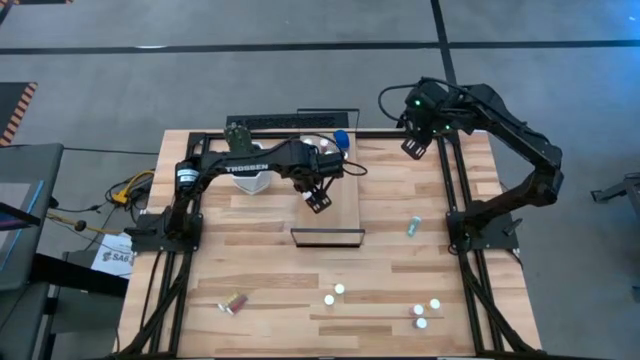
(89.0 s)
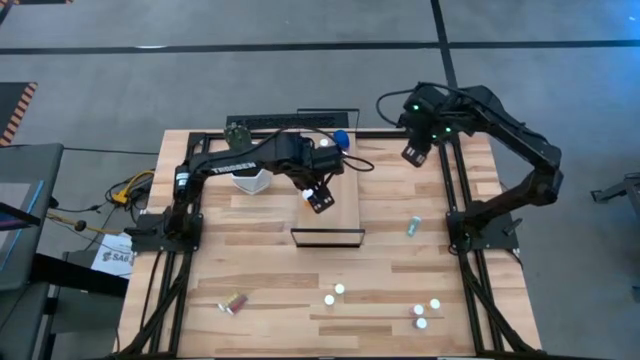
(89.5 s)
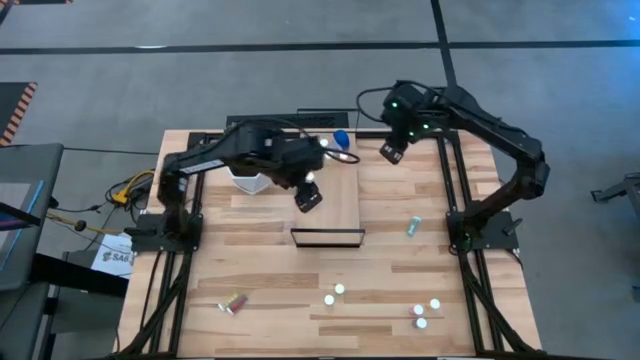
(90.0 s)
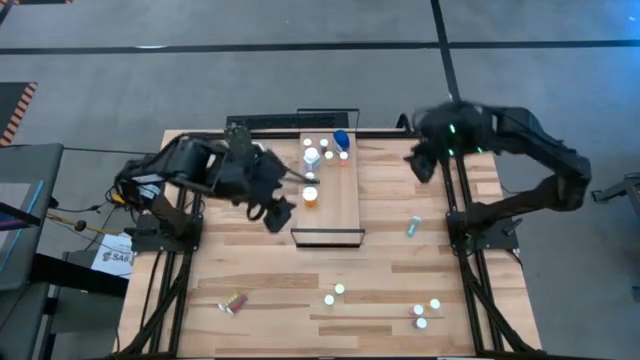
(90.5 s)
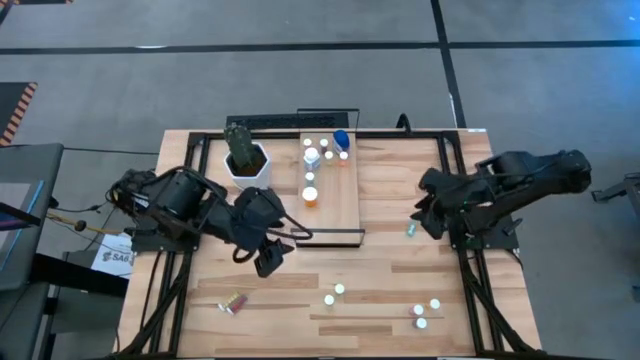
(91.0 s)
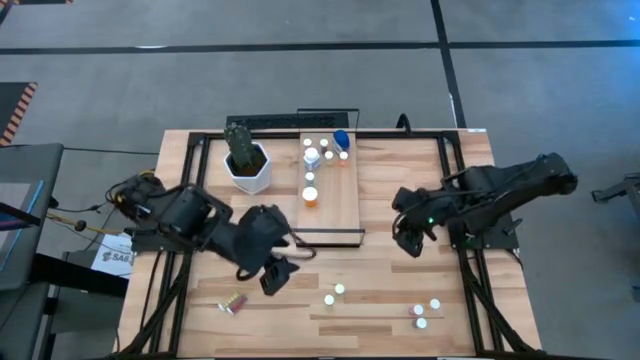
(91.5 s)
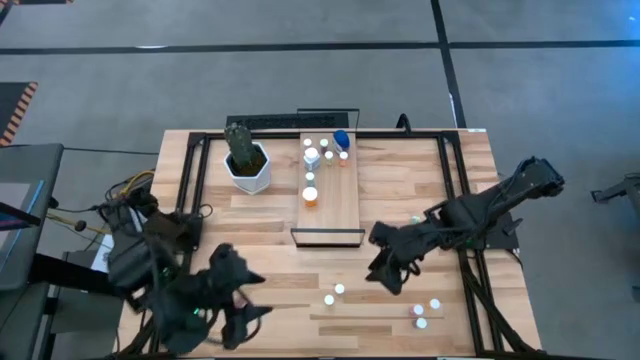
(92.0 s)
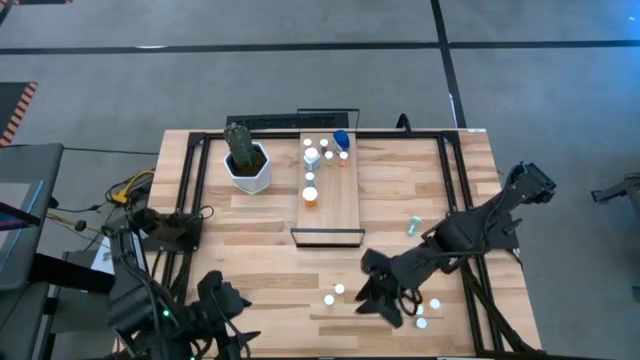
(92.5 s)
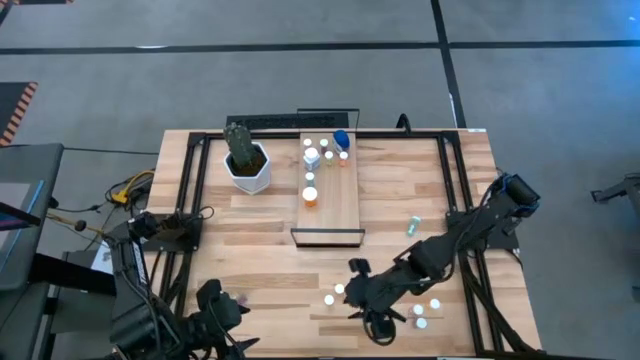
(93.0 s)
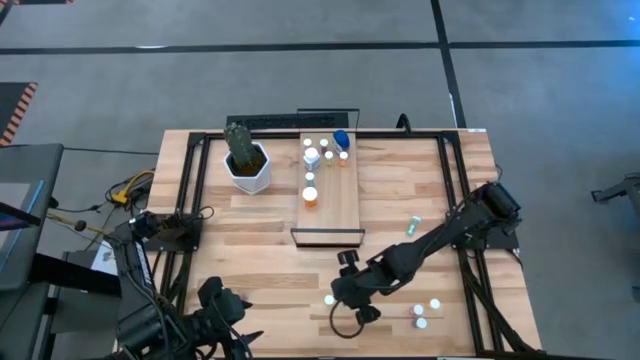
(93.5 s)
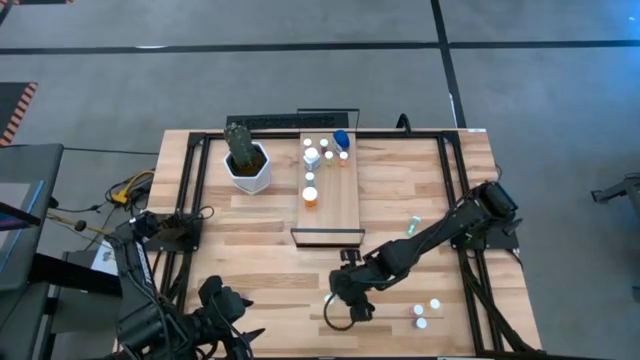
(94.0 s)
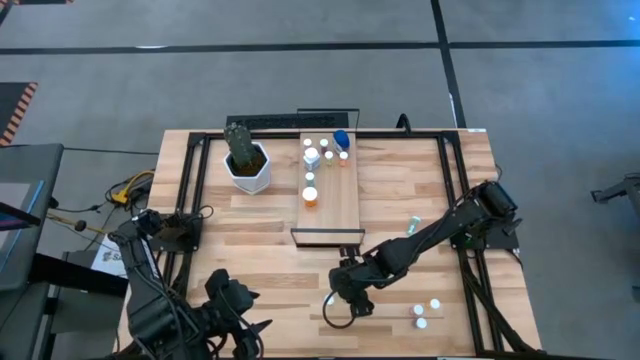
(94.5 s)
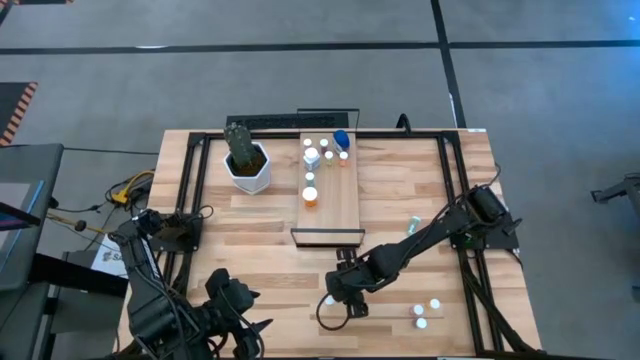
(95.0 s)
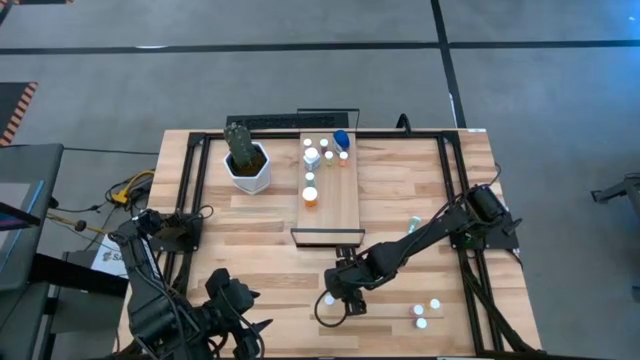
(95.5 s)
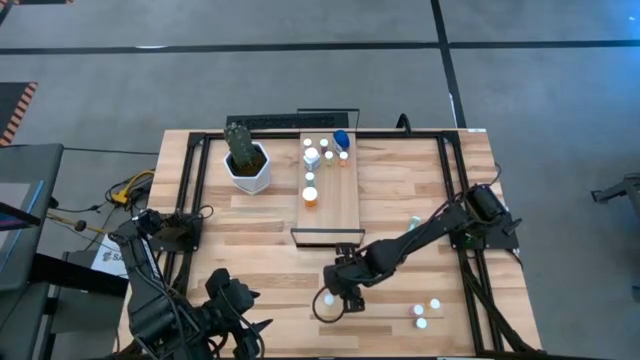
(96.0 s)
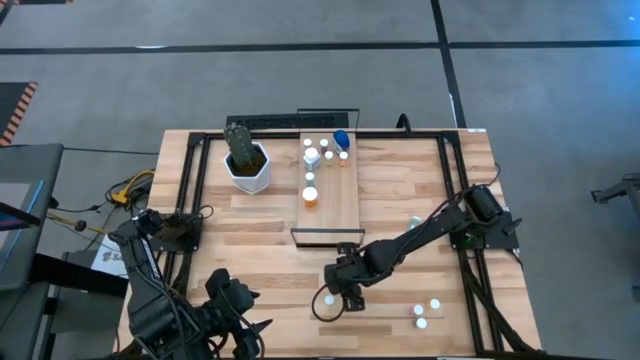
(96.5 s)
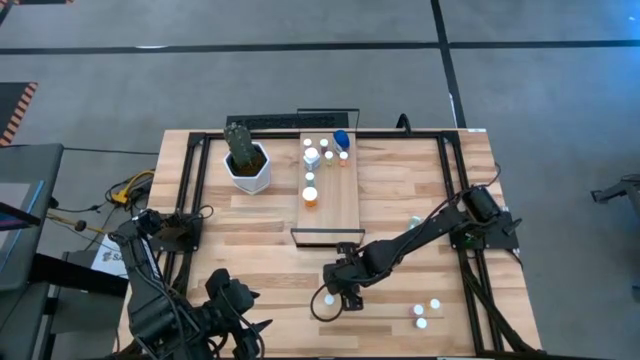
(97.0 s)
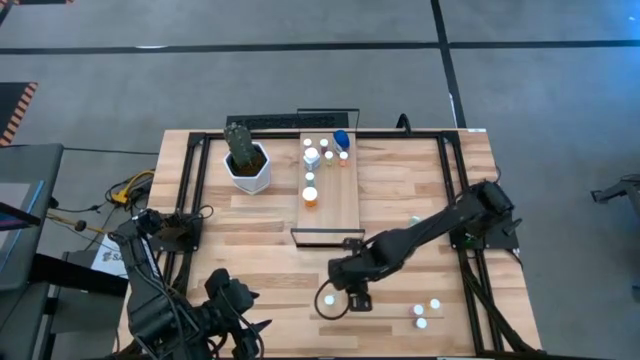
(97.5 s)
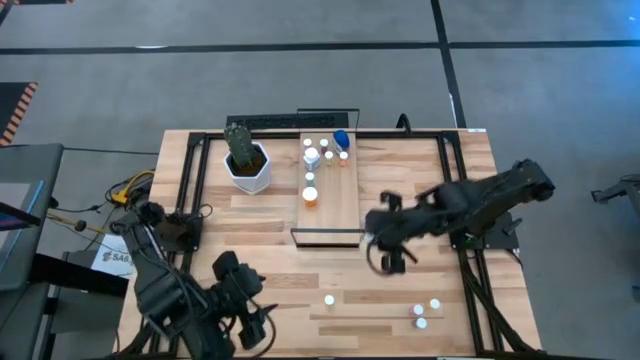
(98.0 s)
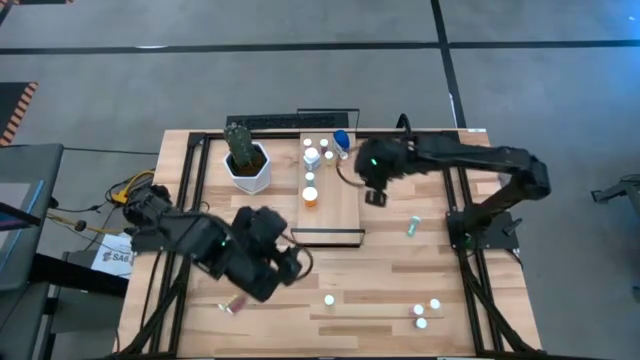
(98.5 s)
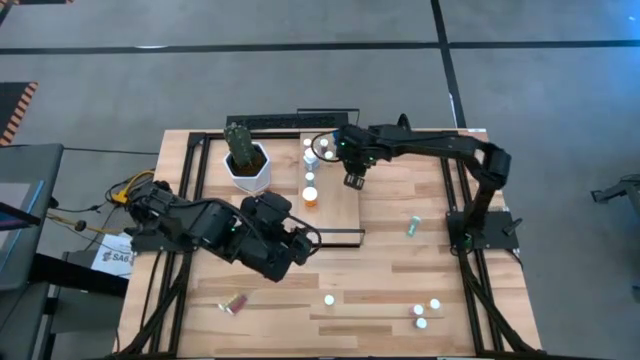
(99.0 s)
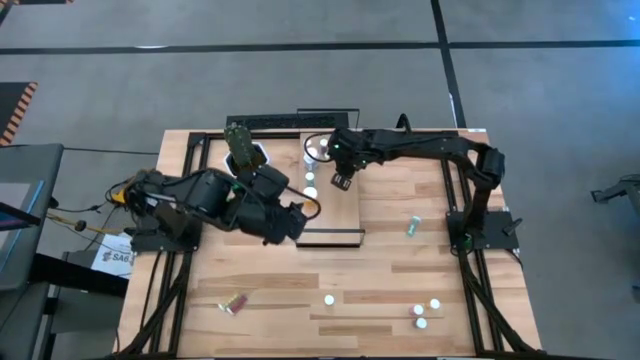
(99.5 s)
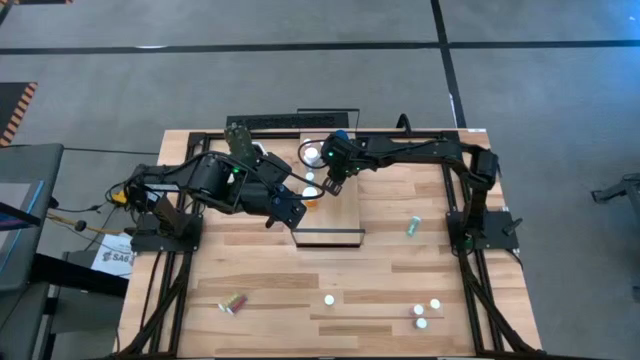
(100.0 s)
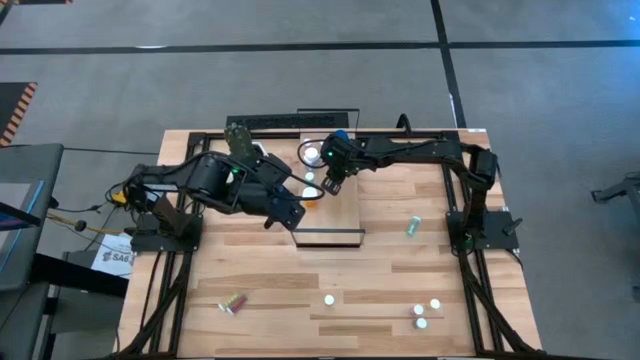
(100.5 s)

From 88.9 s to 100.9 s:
Task: Pick and place medicine bottles onto shelf by color
Put the yellow pill bottle onto the shelf

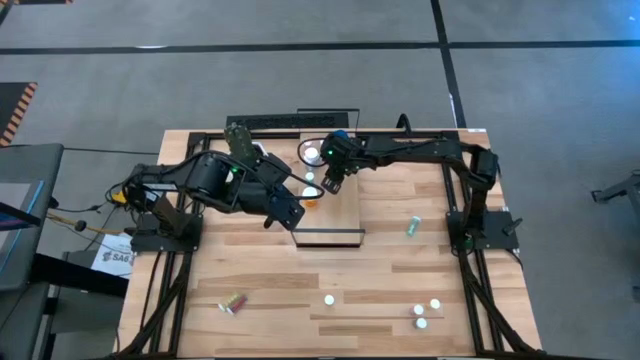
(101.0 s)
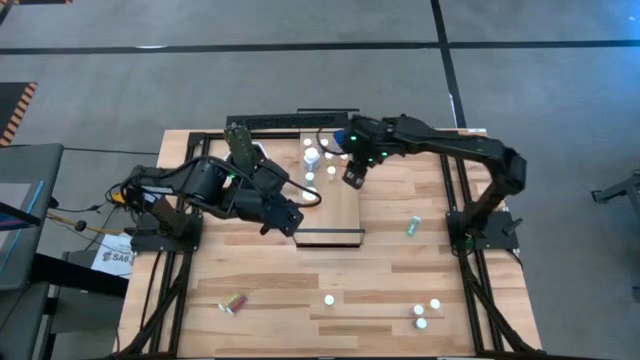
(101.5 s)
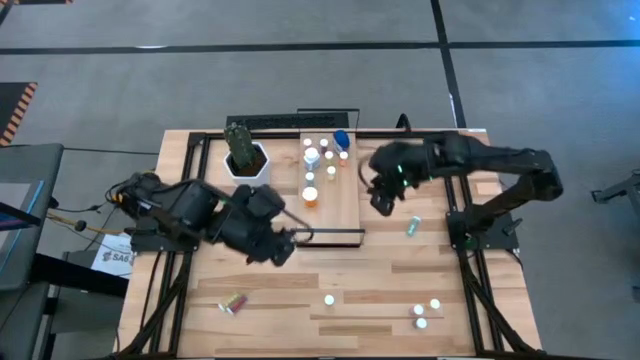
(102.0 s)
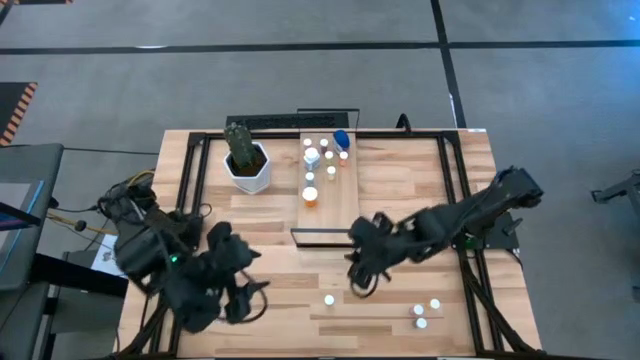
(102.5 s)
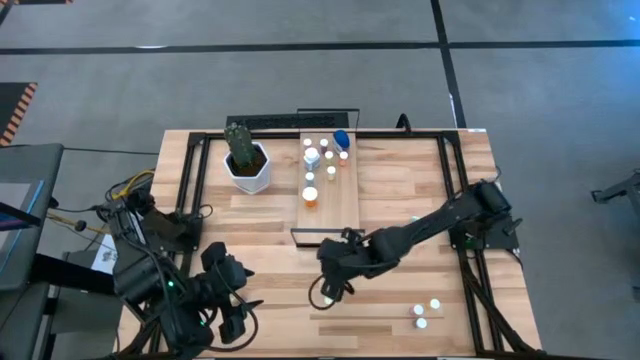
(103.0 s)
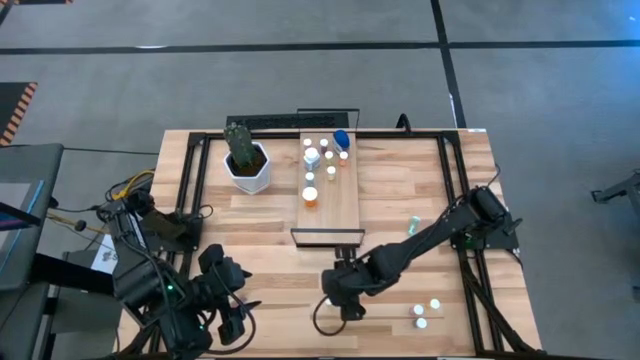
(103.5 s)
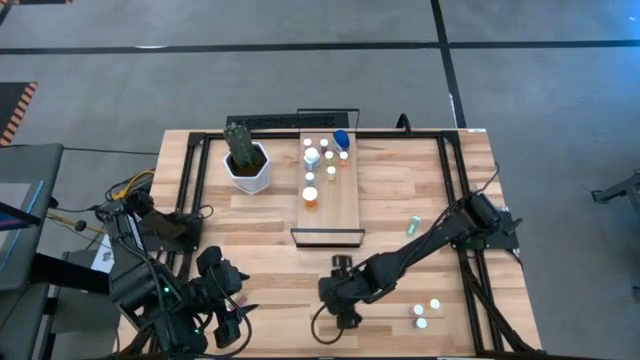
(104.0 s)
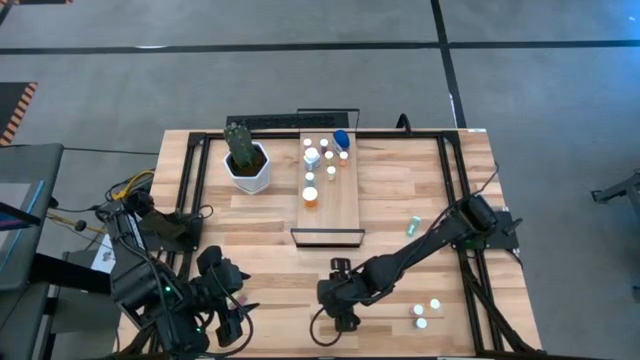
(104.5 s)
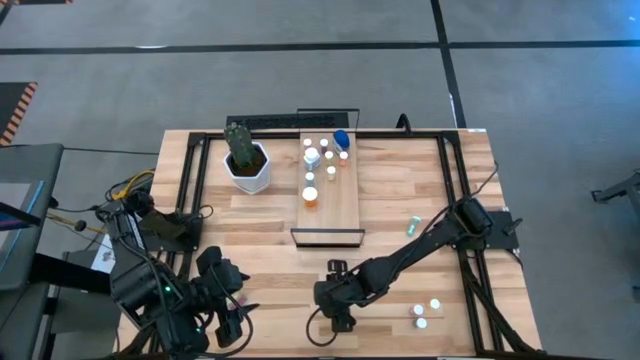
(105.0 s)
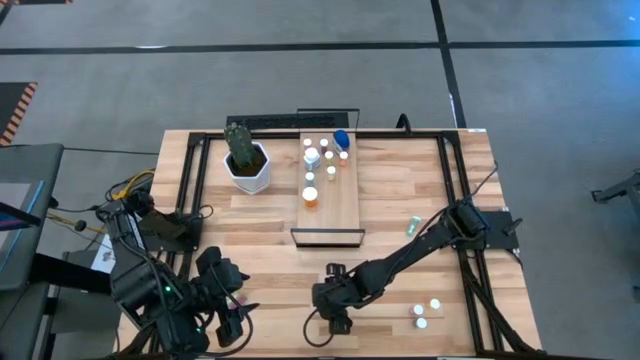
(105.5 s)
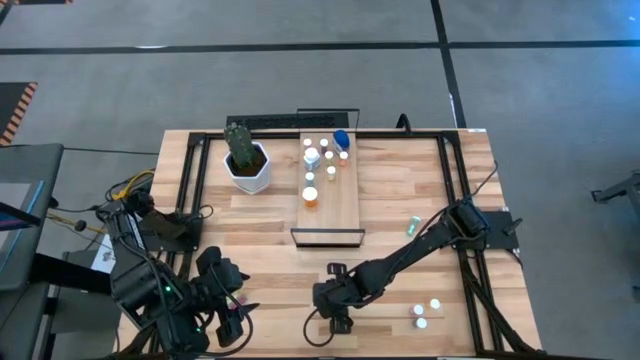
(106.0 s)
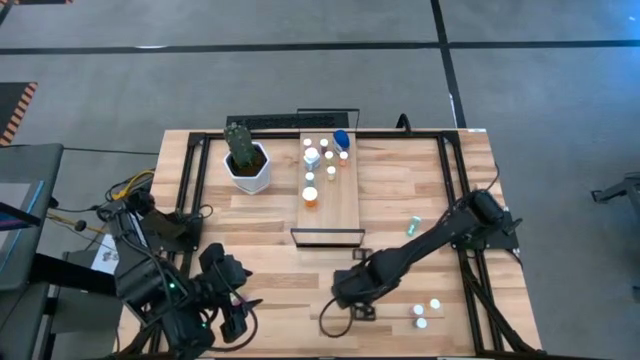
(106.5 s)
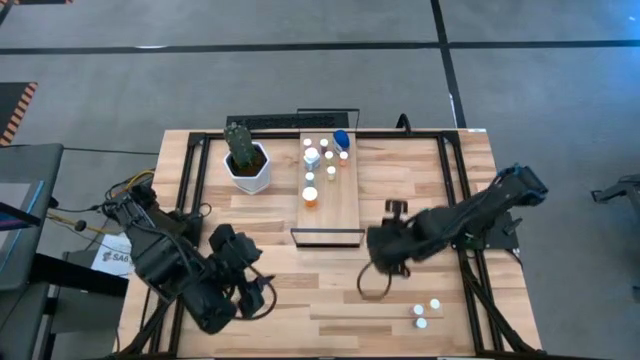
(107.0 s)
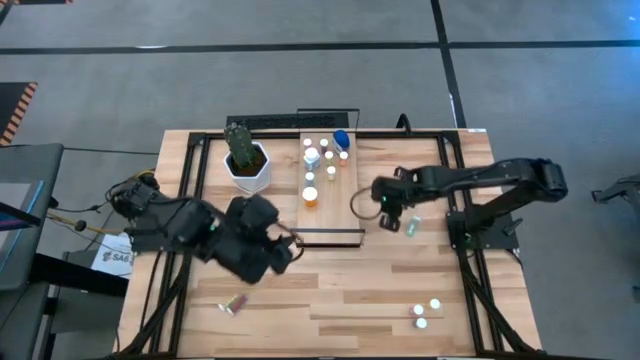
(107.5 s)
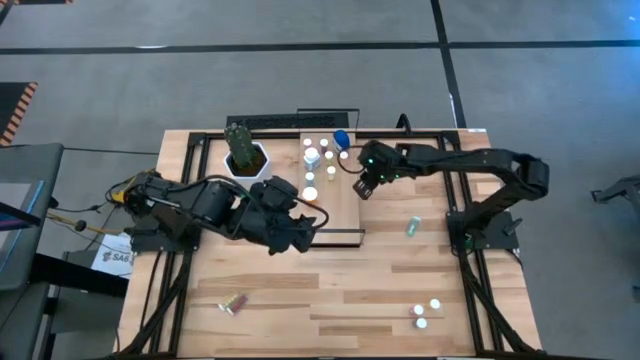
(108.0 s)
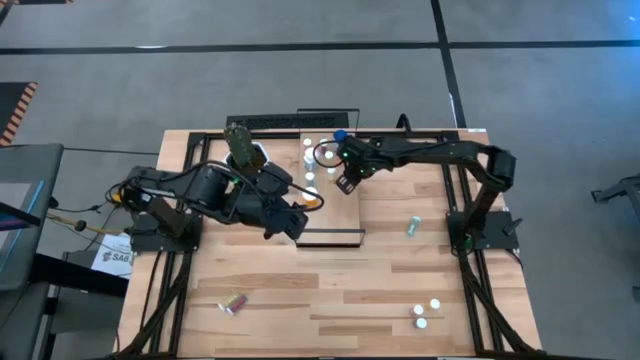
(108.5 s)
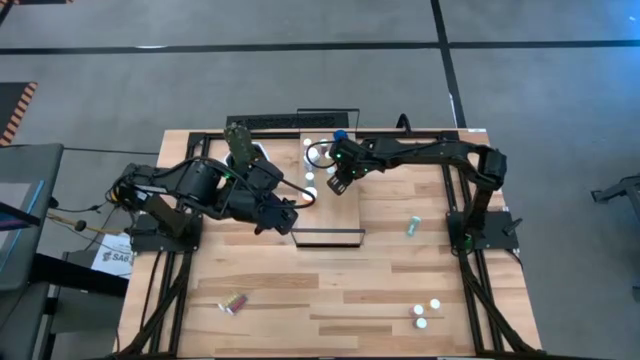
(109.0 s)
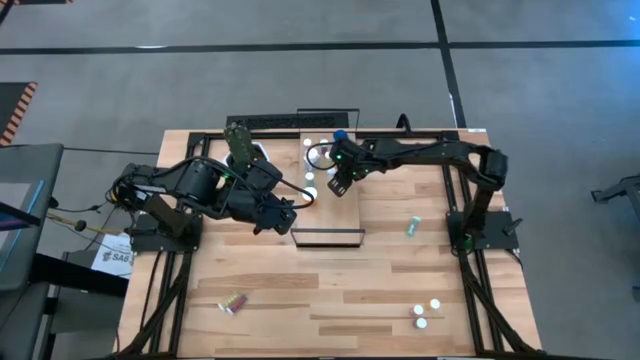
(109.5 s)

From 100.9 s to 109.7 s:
Put the yellow pill bottle on the shelf

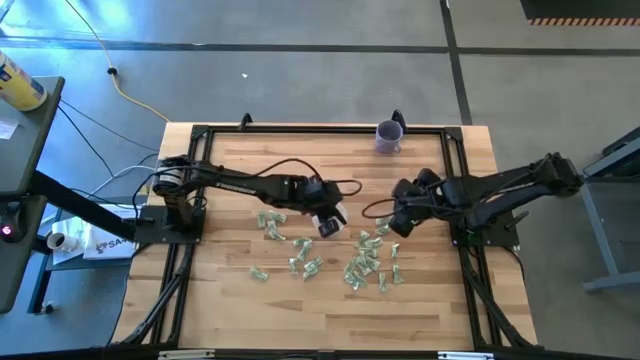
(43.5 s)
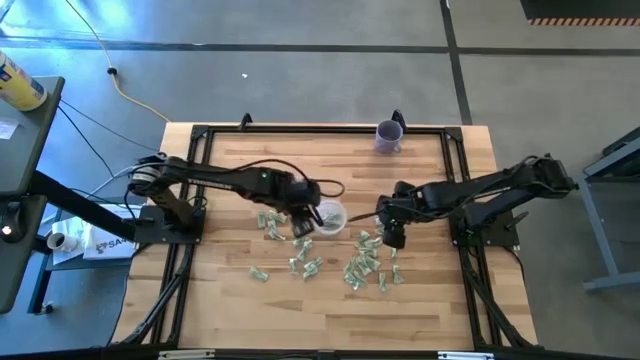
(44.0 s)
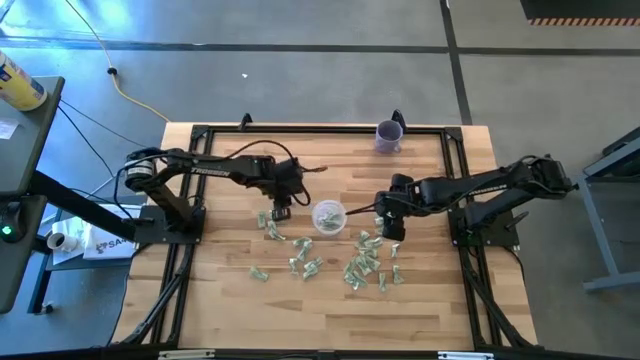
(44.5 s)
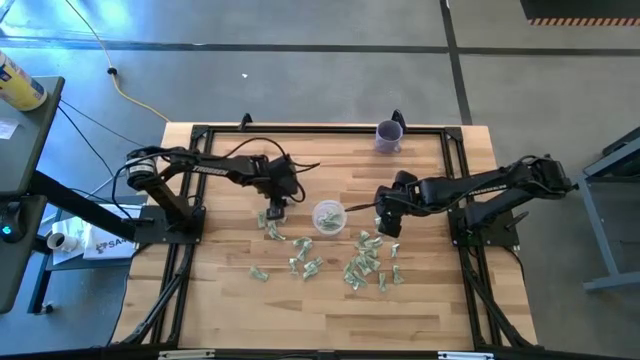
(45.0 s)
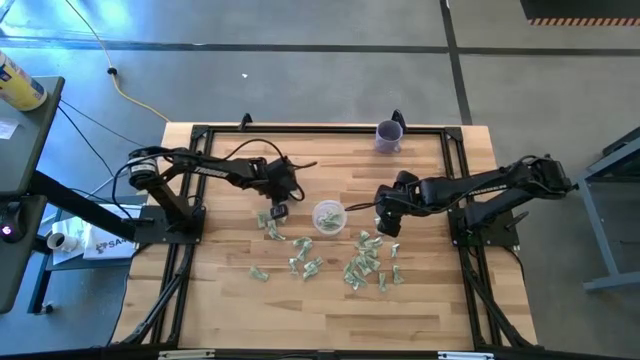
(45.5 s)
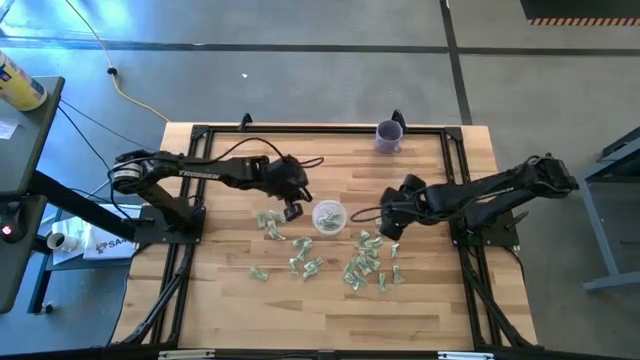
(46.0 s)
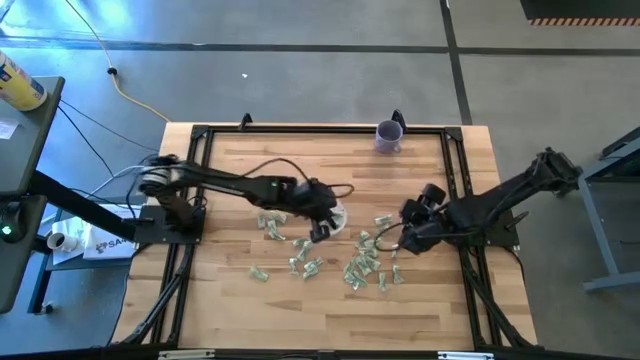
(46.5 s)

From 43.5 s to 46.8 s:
Task: Pick and place Stevia / Truvia into bins
Put the green stevia packet into the transparent bin
